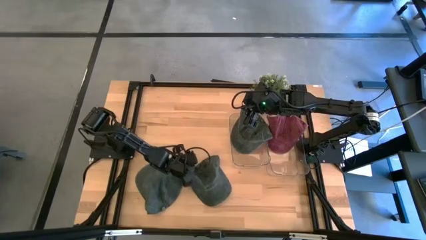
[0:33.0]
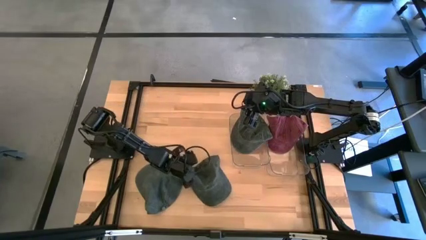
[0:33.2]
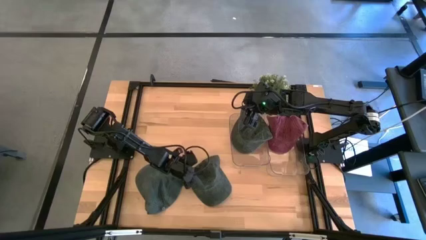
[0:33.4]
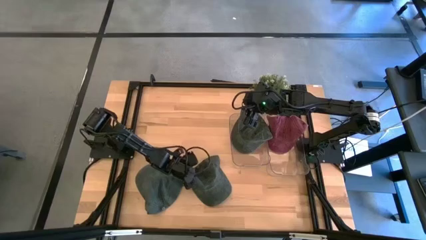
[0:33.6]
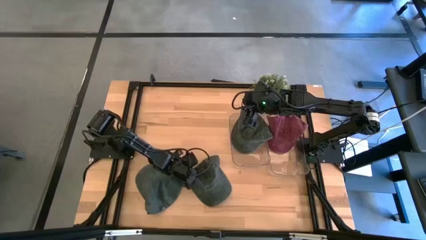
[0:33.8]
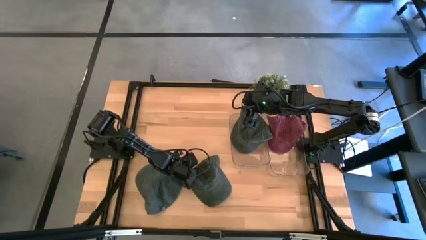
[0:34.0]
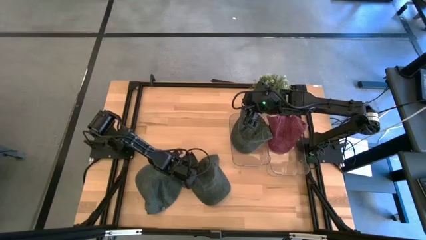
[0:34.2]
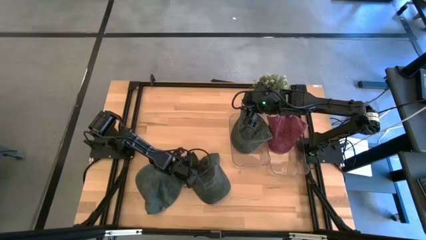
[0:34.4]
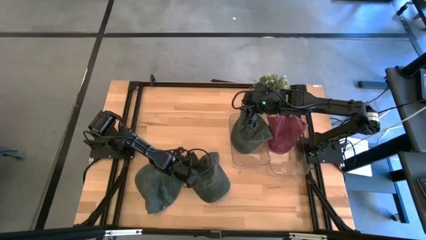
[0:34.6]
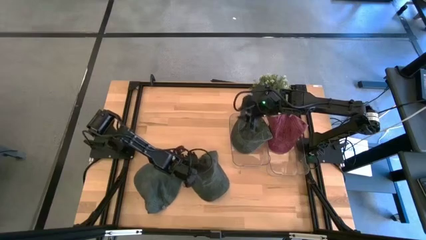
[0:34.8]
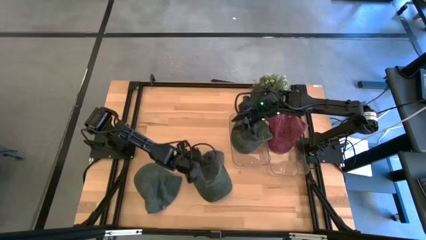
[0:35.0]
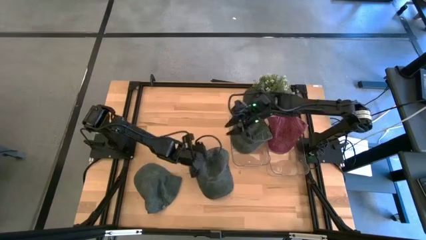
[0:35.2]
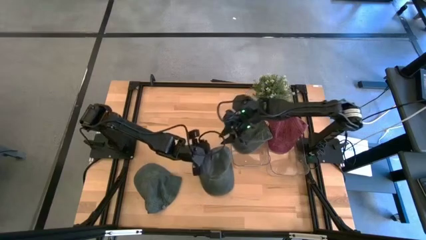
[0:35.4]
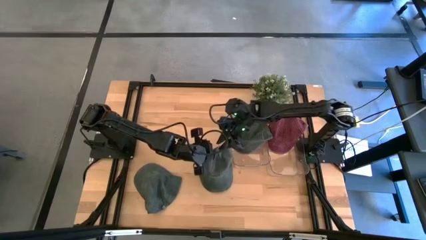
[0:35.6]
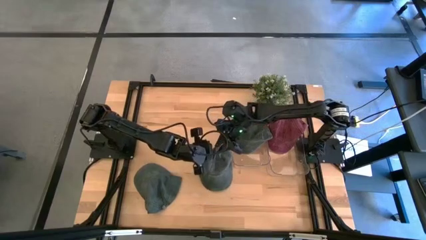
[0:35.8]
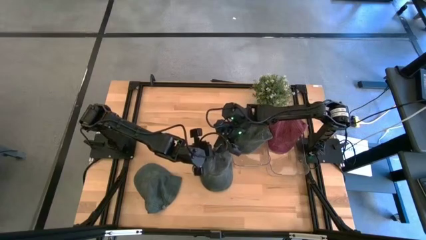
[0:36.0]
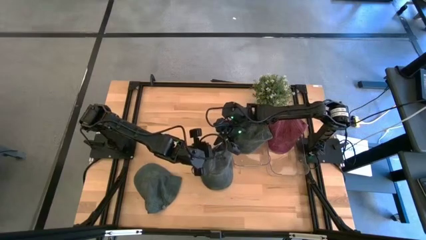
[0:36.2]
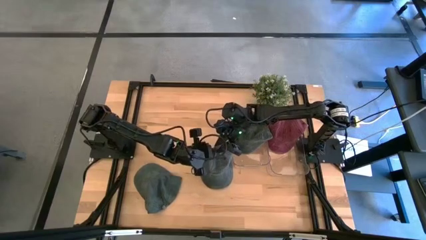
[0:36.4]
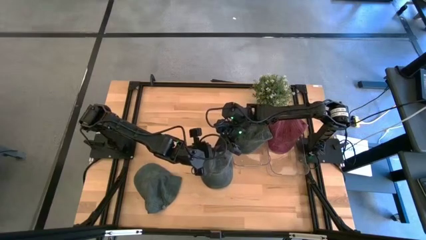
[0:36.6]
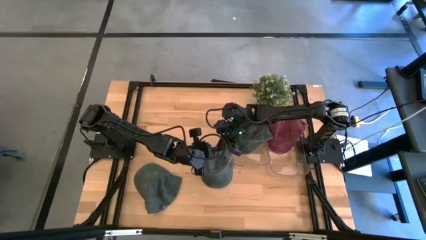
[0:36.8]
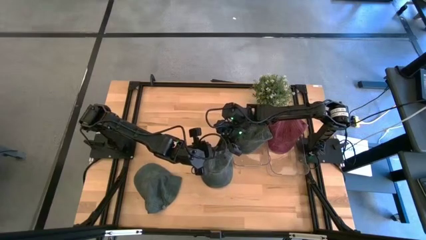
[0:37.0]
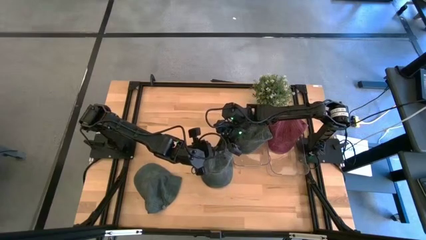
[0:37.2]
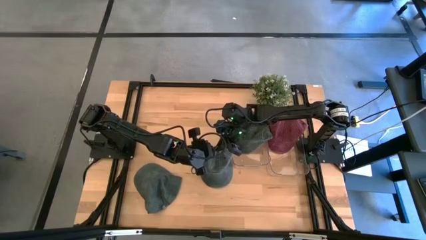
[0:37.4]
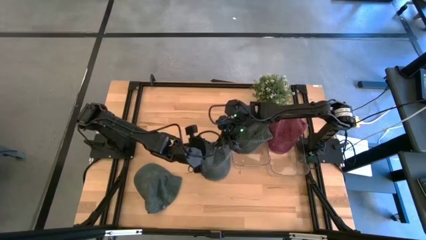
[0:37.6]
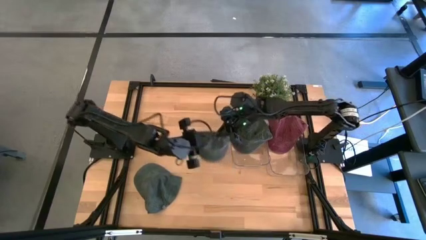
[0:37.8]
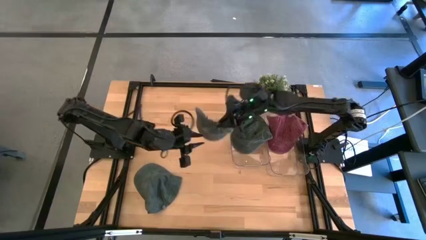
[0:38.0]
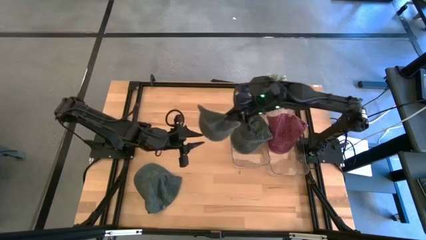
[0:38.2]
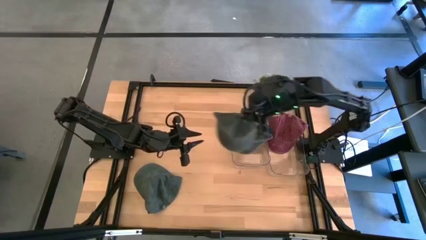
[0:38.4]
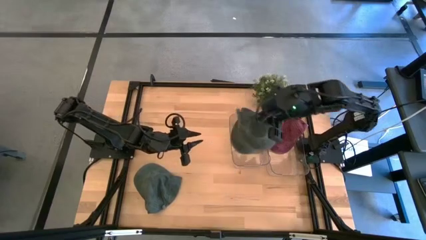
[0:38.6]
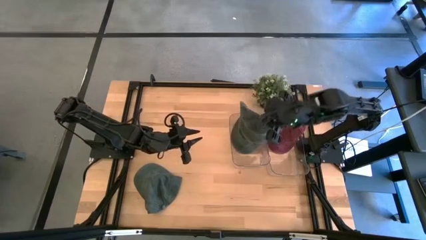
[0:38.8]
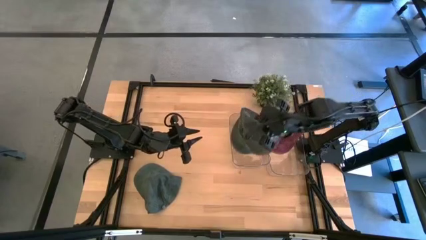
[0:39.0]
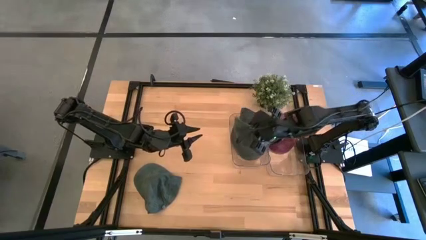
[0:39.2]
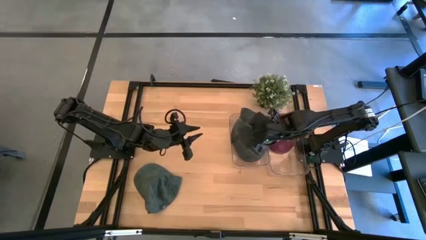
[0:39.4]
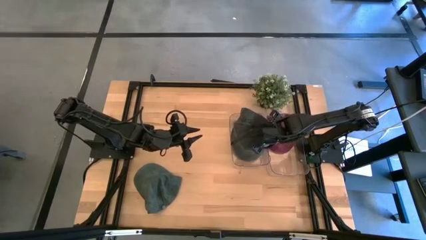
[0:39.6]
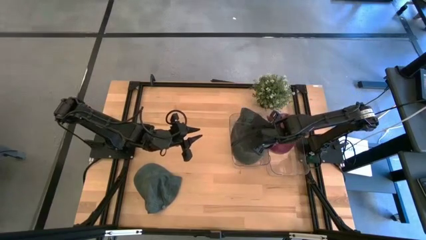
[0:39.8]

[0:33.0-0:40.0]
Task: Pick & Place hat
Put the right black cap into the left transparent bin

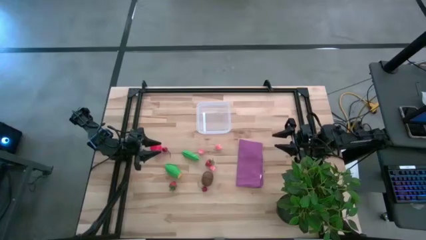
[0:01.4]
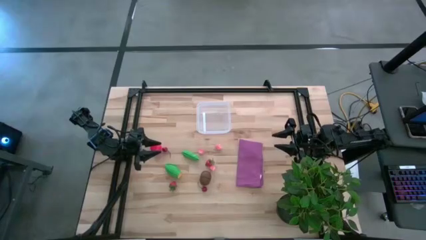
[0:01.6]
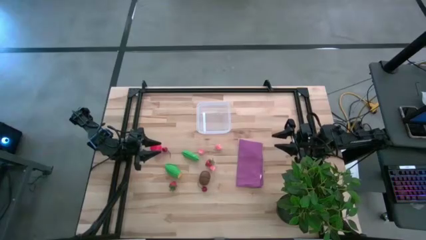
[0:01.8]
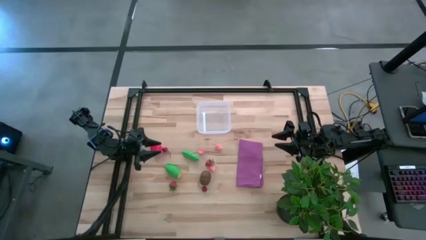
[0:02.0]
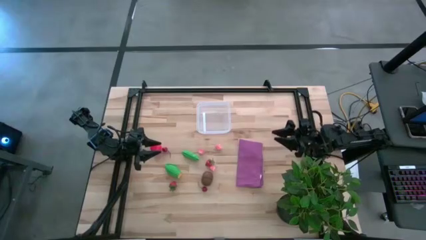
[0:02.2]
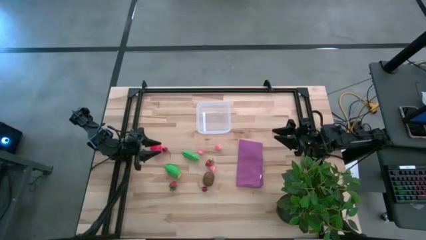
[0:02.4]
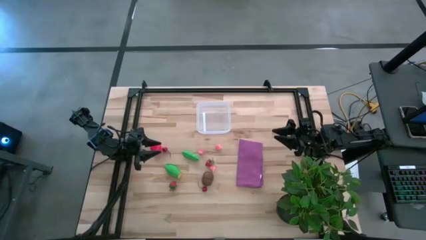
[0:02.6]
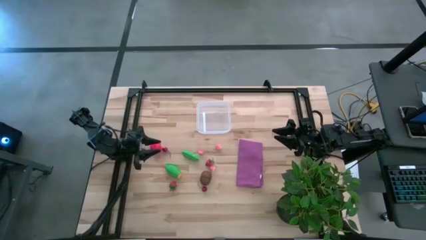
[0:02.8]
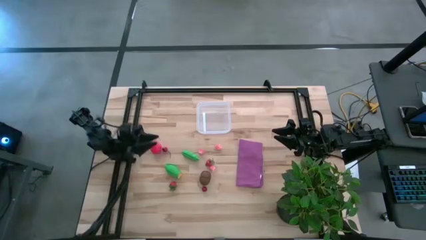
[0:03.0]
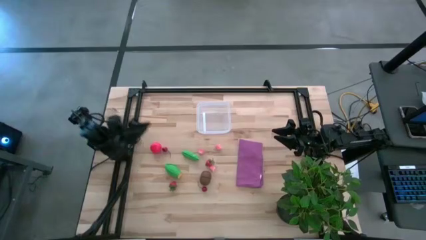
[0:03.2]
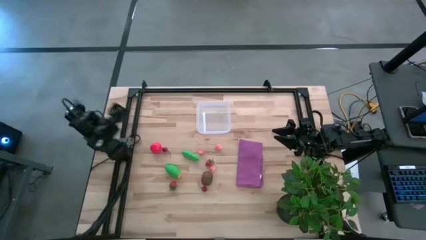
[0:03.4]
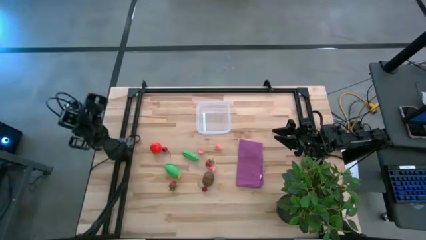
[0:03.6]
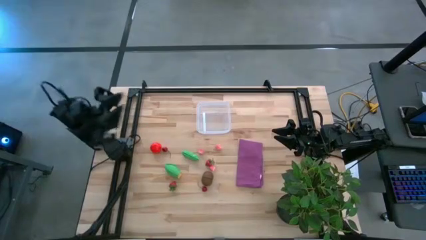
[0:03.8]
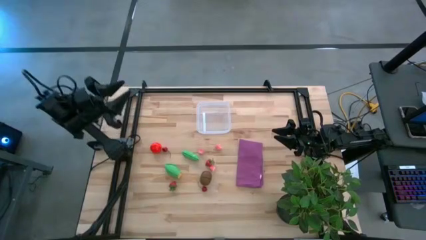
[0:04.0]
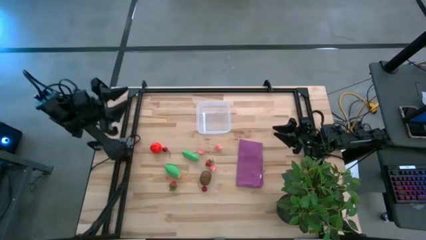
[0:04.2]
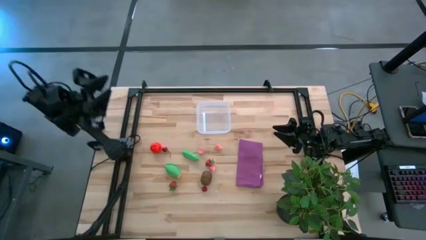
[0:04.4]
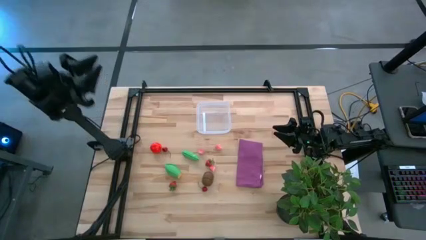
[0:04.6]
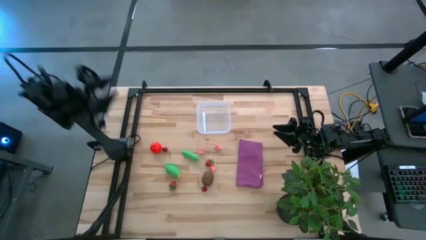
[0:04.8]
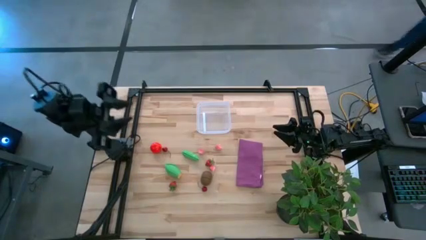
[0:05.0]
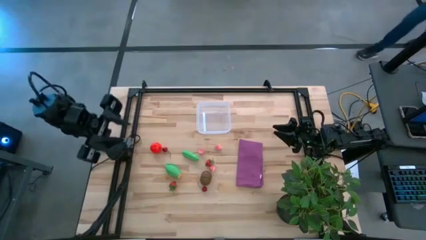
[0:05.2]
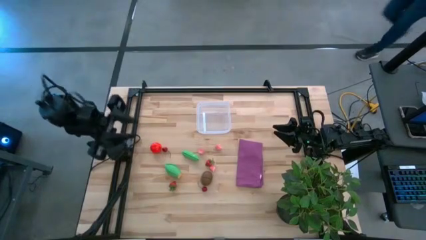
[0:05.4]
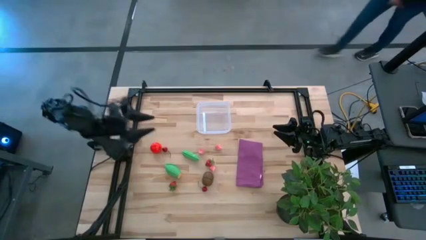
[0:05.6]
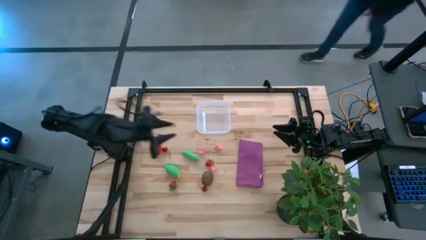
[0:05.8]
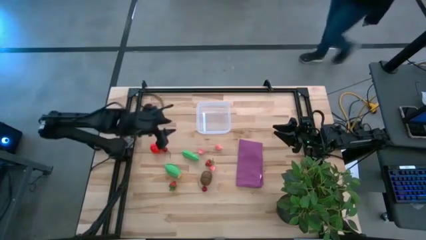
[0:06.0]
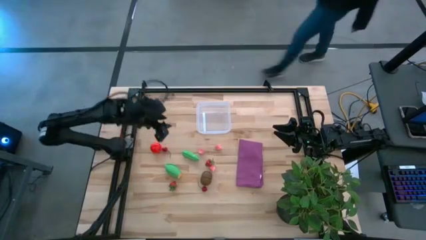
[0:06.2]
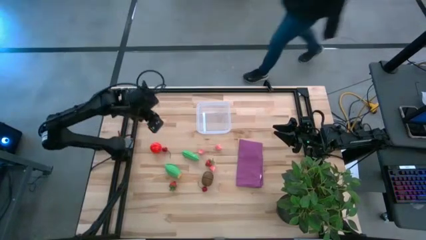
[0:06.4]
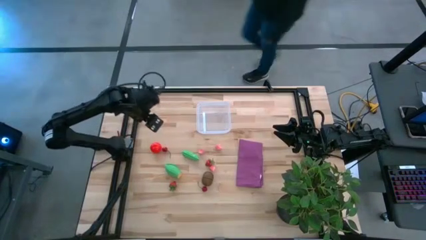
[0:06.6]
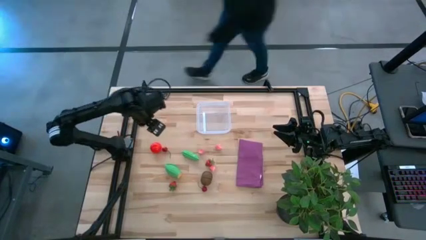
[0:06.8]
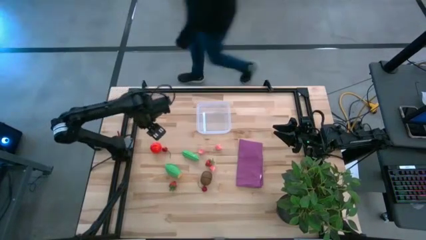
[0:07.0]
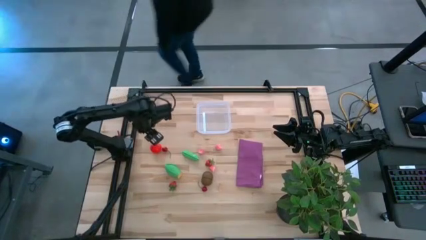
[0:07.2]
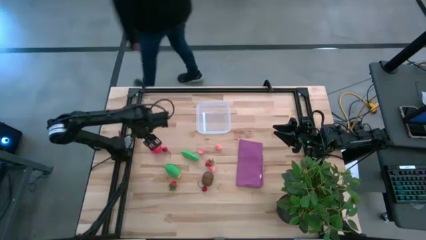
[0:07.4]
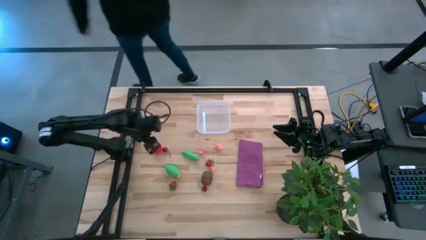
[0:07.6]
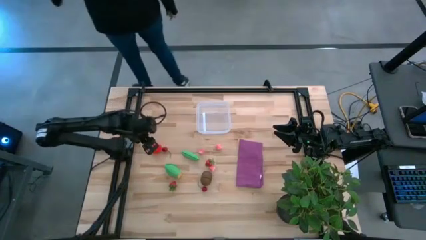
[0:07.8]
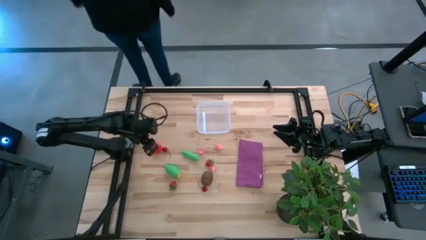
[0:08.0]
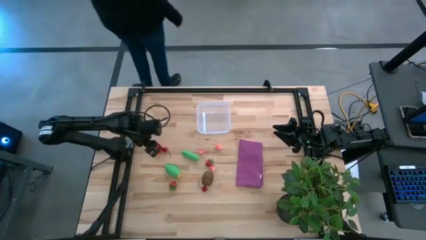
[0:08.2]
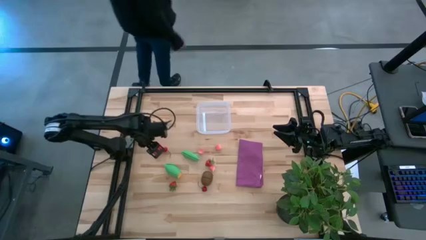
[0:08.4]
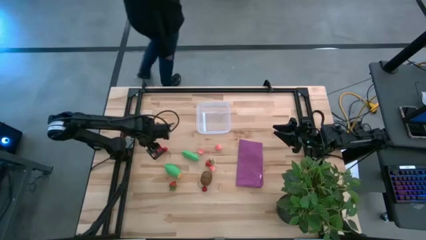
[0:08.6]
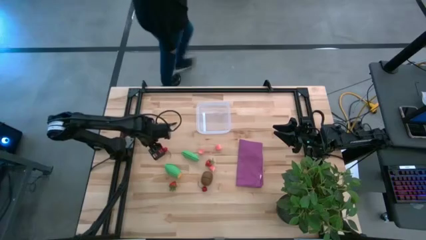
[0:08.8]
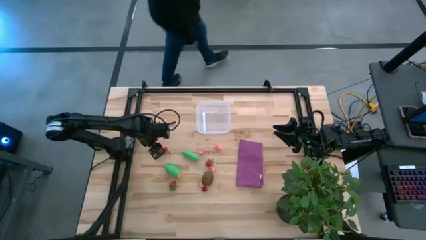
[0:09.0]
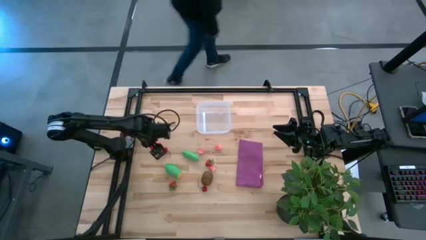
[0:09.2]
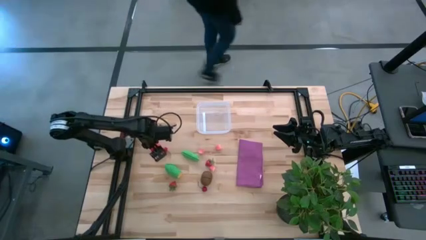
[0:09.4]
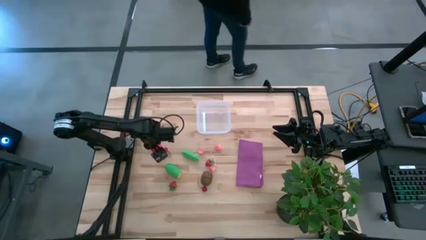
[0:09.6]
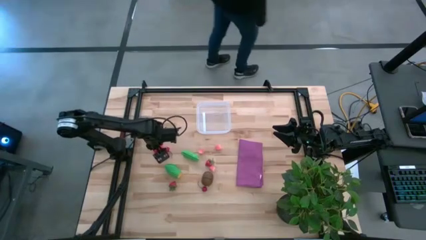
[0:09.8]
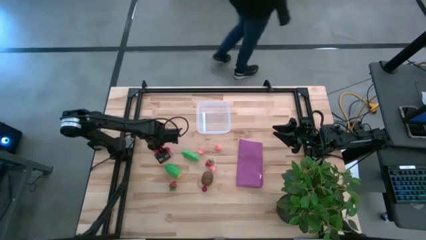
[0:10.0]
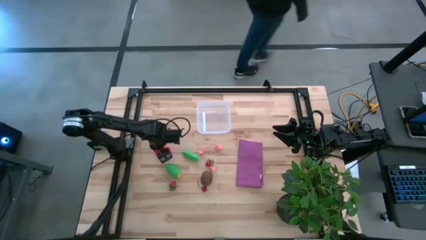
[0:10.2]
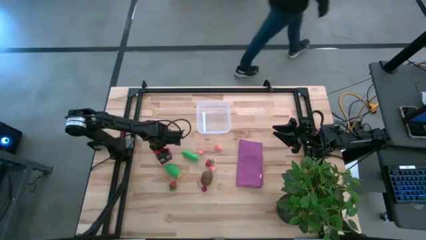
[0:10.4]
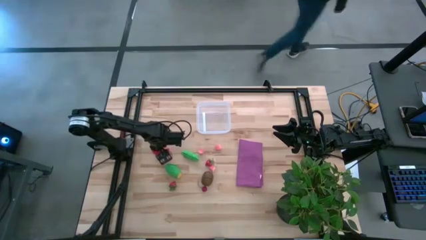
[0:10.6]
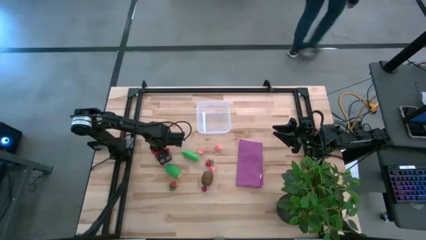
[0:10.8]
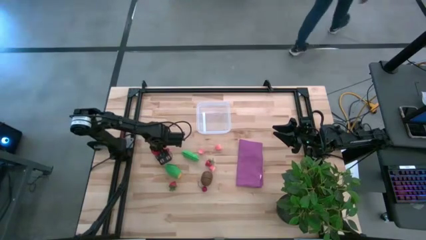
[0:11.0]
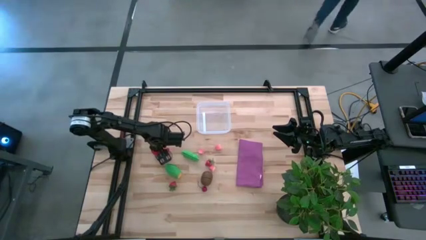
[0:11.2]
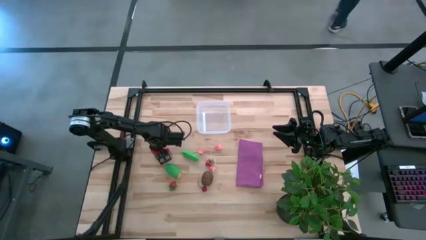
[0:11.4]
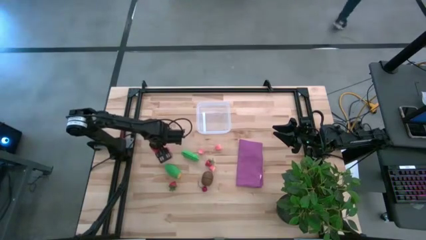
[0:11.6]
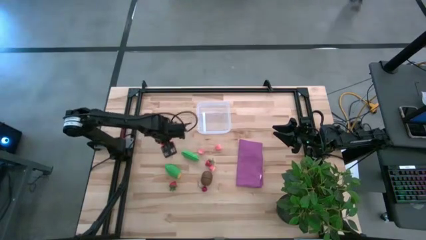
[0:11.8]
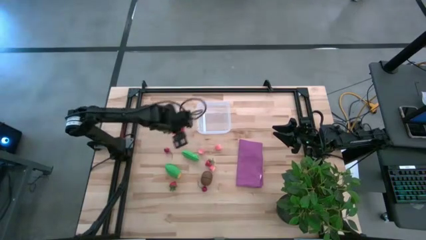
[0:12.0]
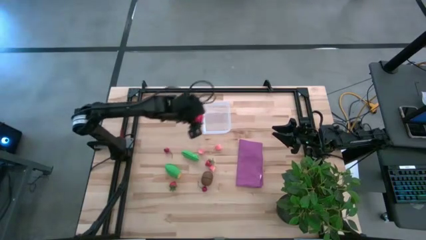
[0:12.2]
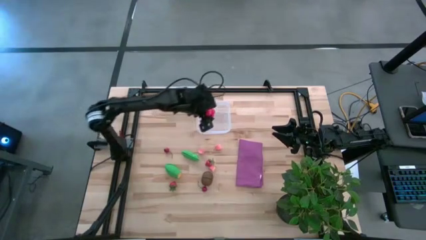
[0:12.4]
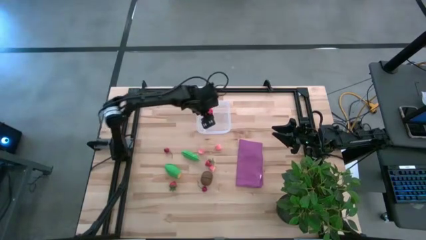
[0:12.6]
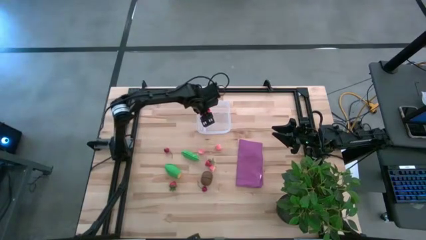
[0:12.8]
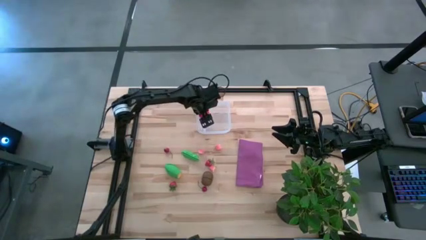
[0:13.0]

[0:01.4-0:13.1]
Task: Pick and placing Produce into tupperware
Put the red tomato into the white bin
